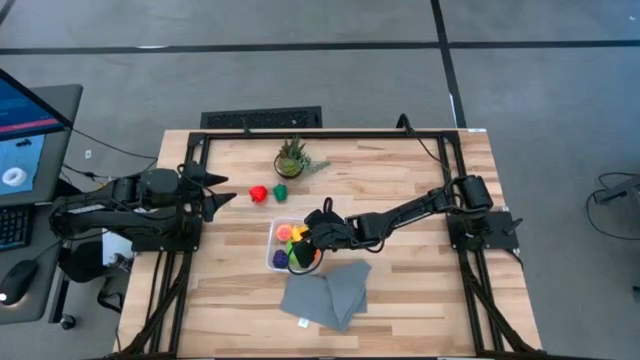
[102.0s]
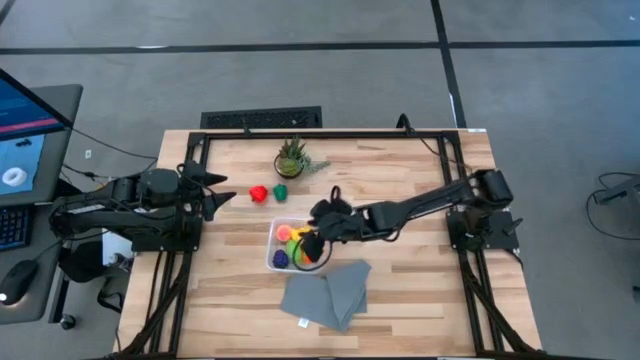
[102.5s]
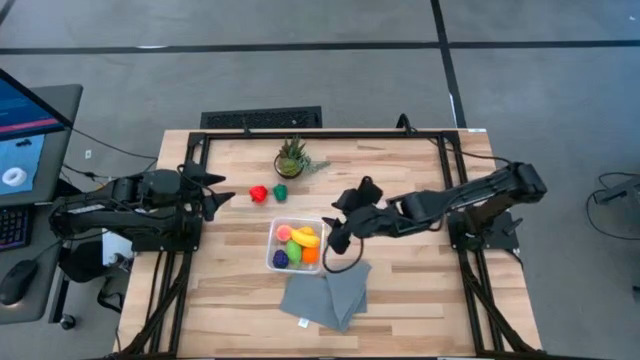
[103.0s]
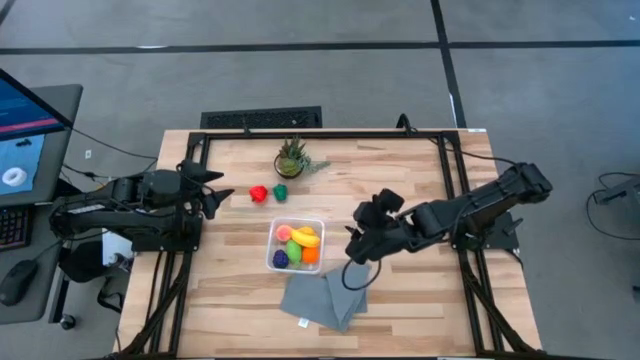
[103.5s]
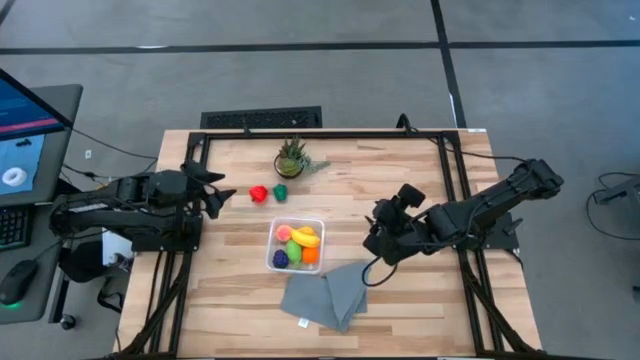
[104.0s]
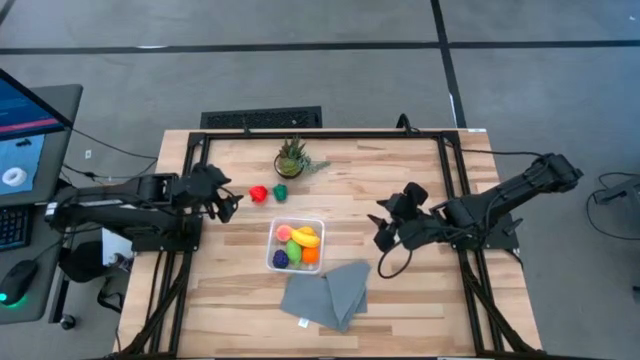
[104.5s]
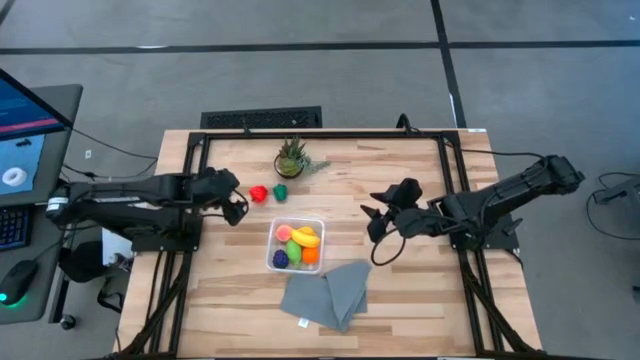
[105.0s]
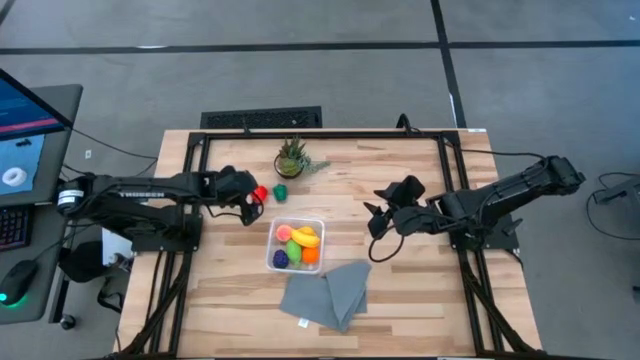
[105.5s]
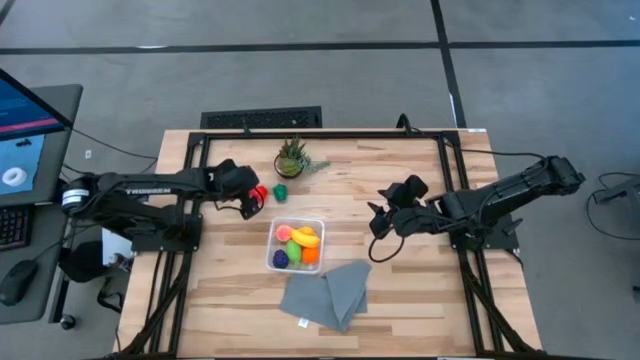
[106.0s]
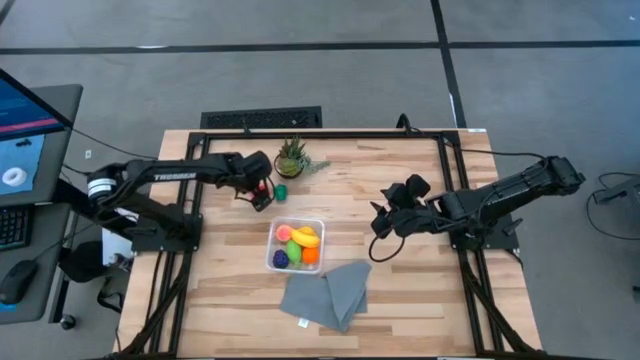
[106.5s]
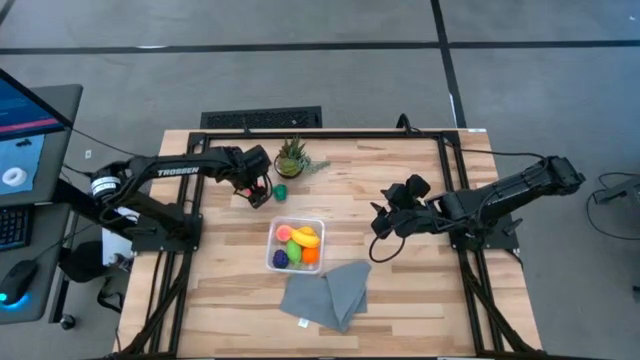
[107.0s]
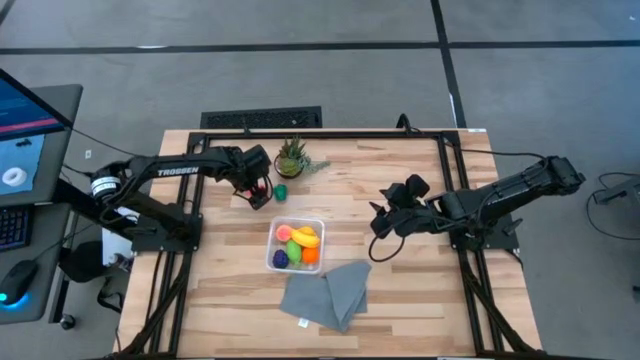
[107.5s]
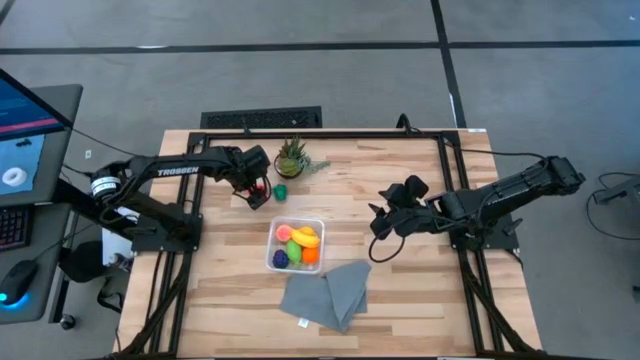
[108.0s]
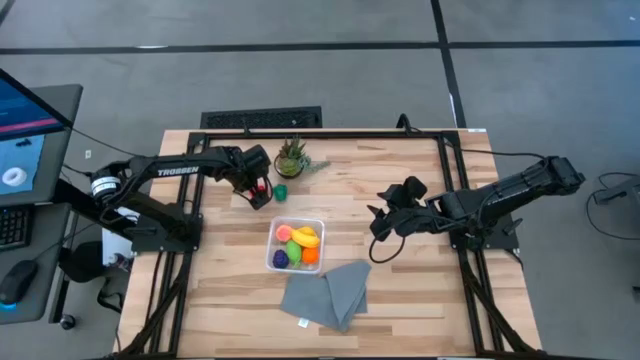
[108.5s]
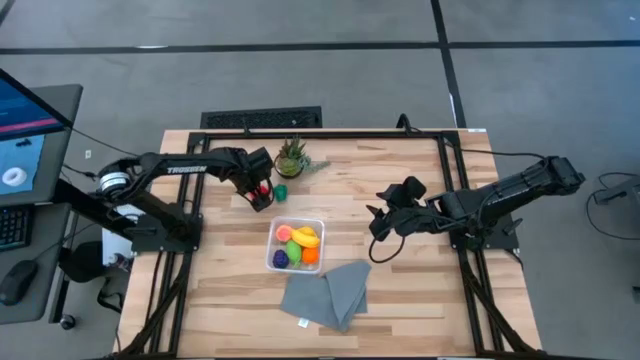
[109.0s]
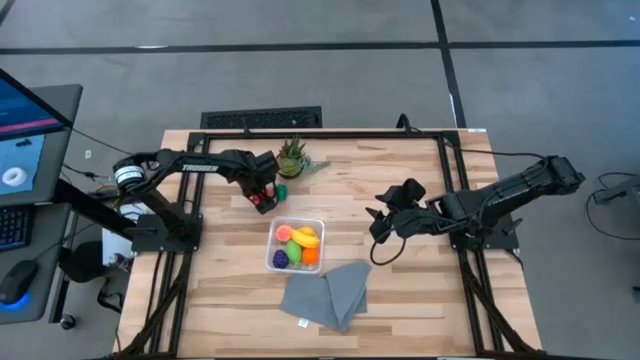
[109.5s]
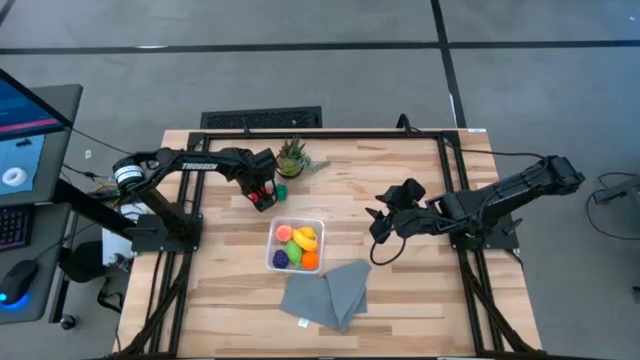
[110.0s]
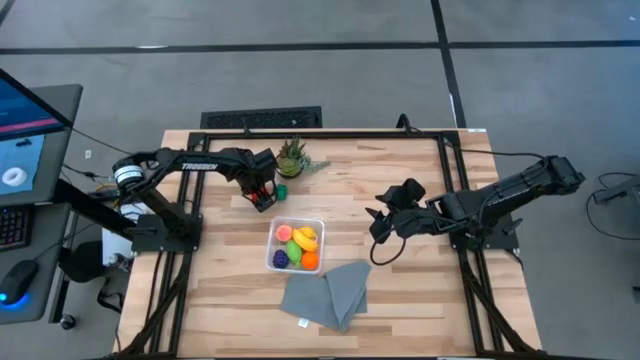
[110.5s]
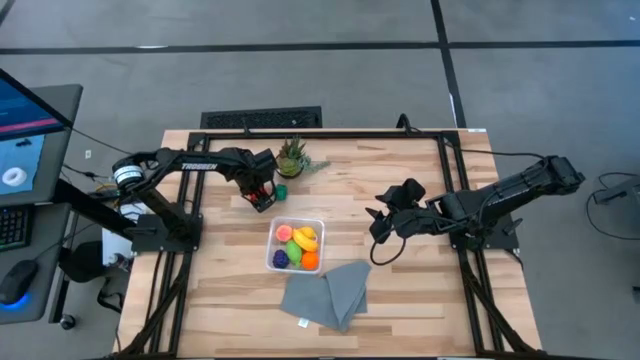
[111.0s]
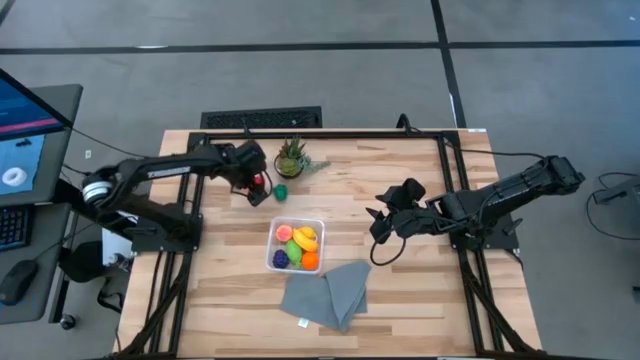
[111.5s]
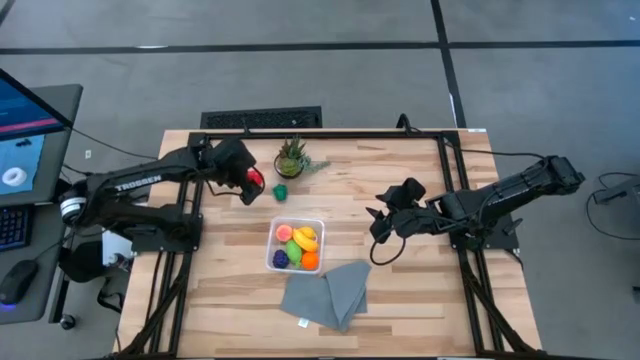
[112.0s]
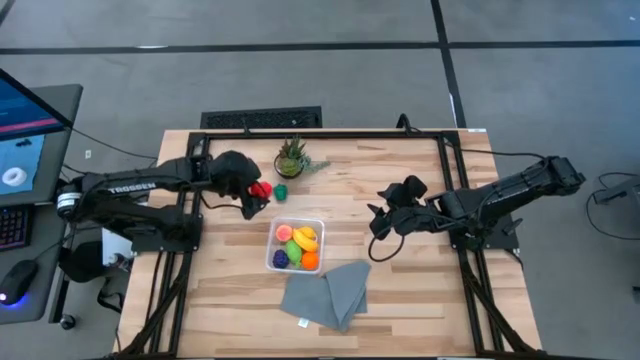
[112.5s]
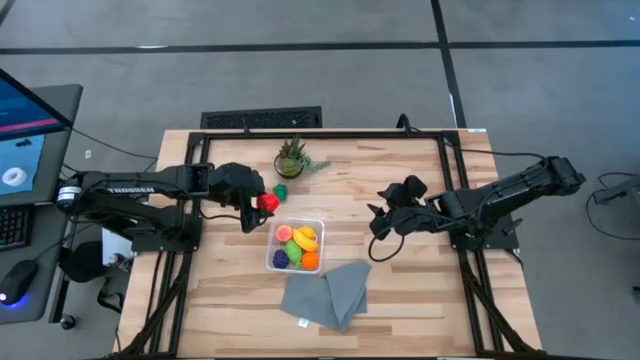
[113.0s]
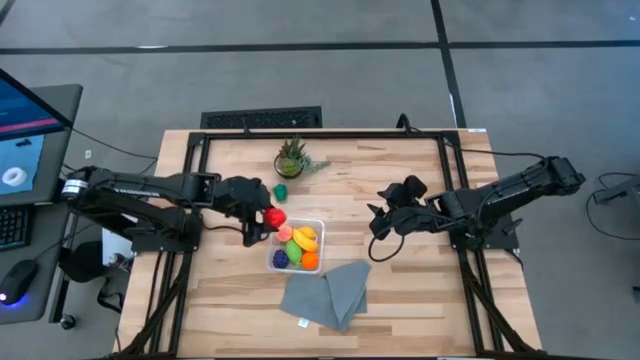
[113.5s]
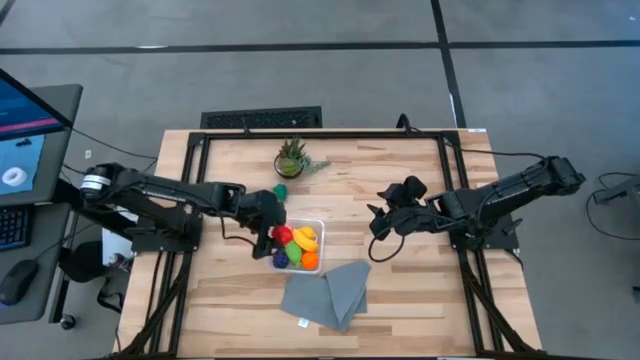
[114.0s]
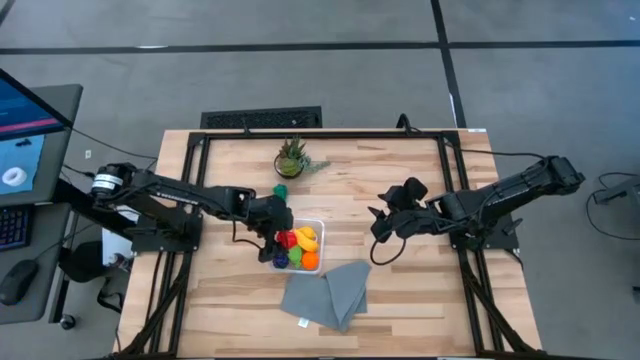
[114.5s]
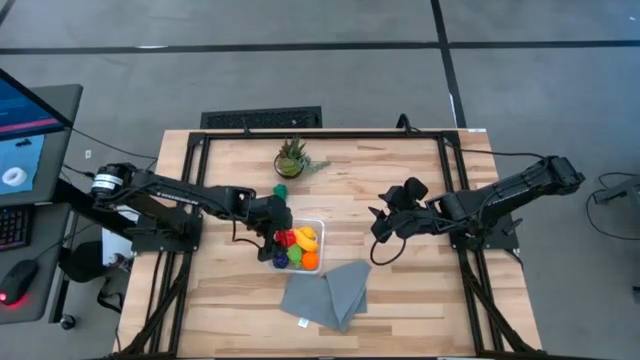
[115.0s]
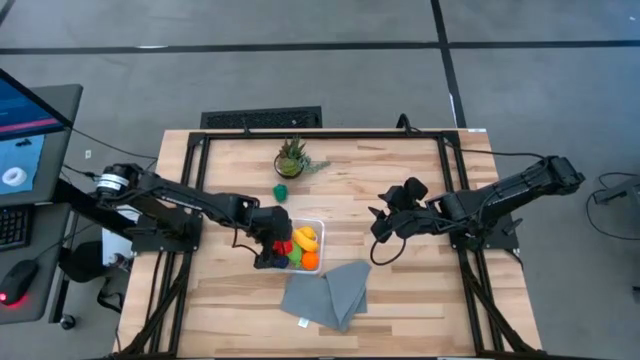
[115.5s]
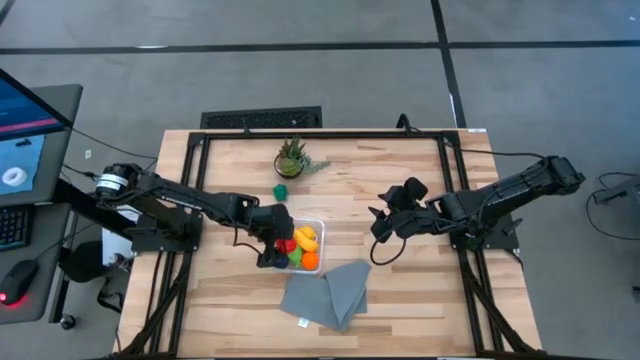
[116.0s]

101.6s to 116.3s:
Task: Pick and placing Produce into tupperware
Put the red apple into the transparent container
